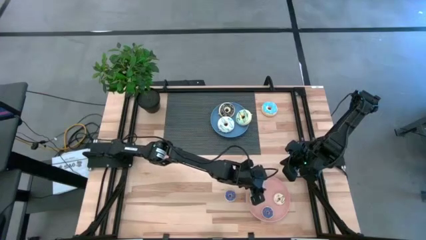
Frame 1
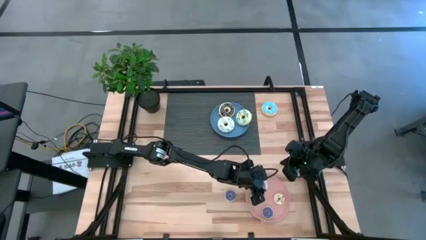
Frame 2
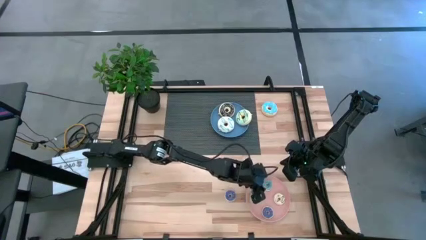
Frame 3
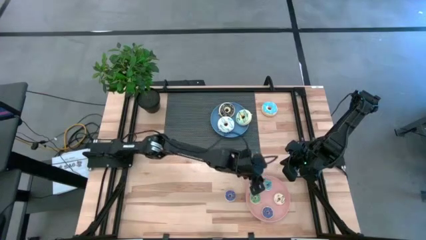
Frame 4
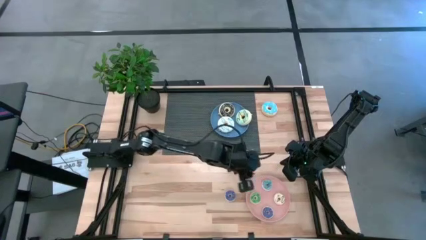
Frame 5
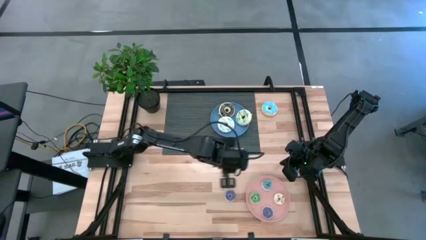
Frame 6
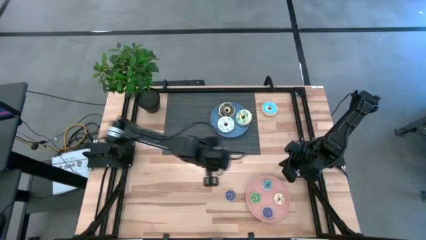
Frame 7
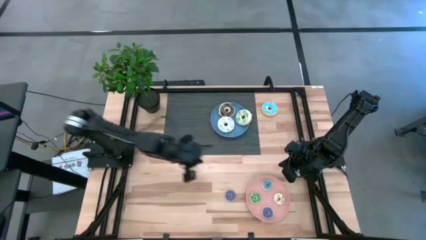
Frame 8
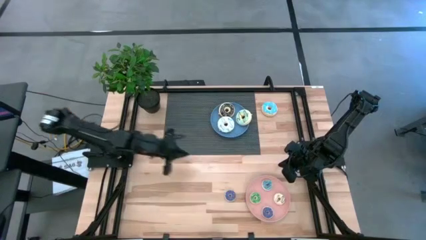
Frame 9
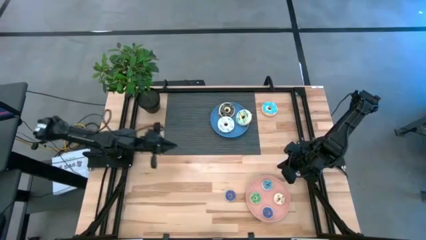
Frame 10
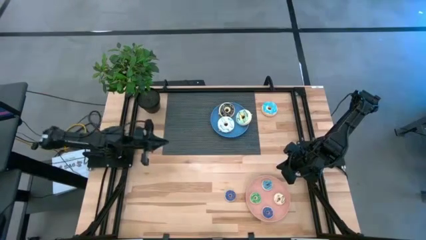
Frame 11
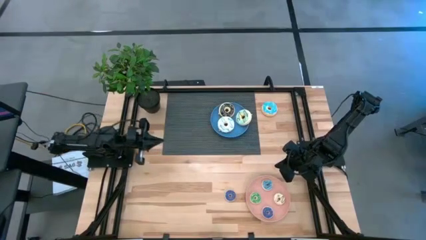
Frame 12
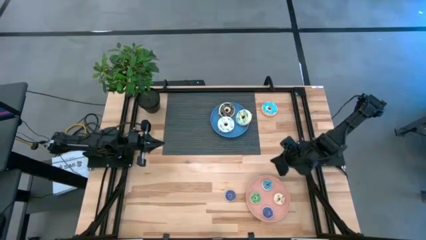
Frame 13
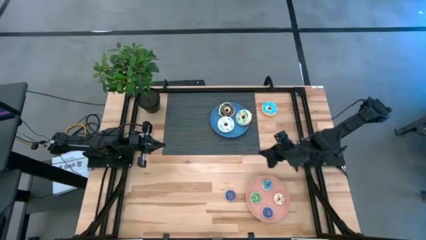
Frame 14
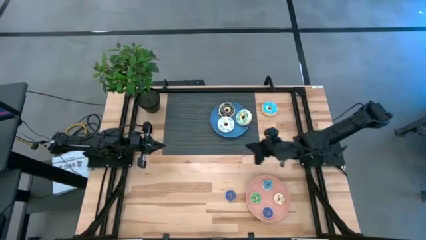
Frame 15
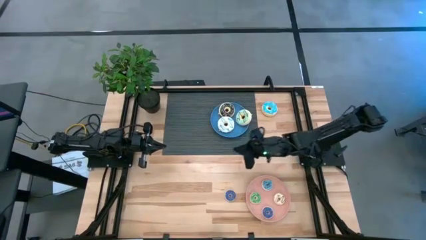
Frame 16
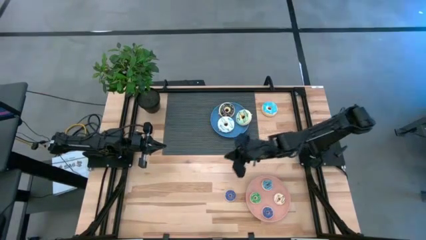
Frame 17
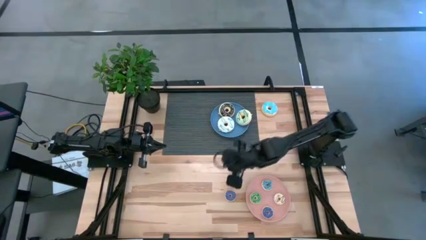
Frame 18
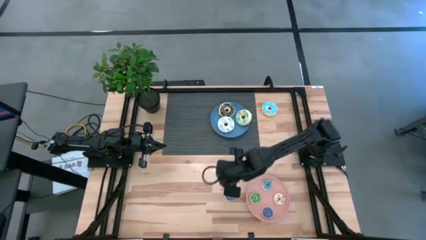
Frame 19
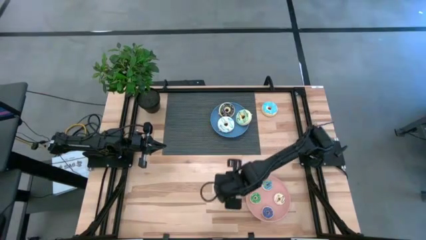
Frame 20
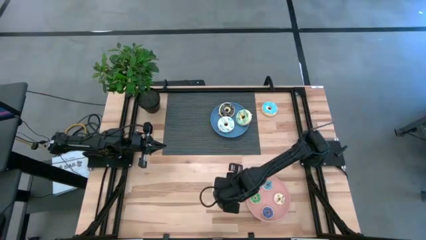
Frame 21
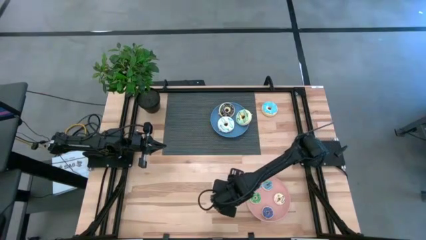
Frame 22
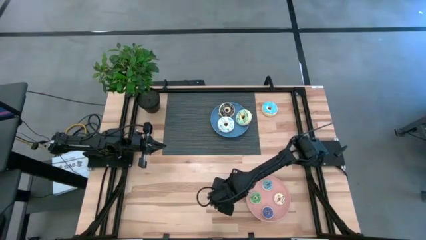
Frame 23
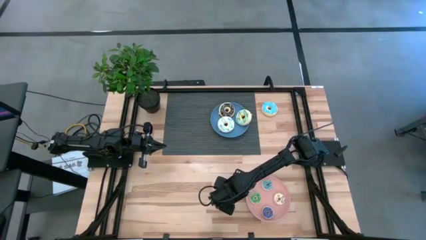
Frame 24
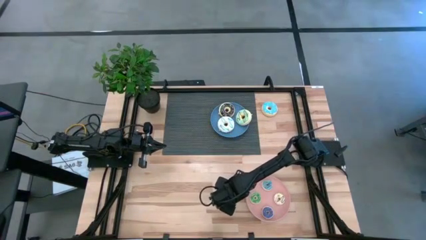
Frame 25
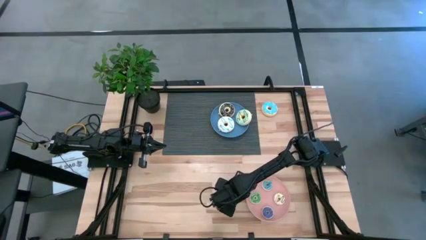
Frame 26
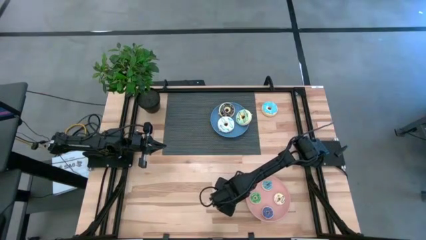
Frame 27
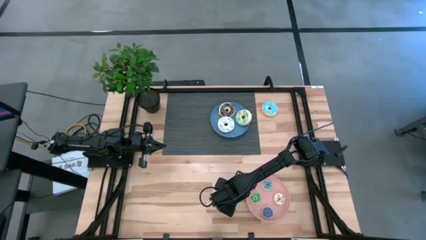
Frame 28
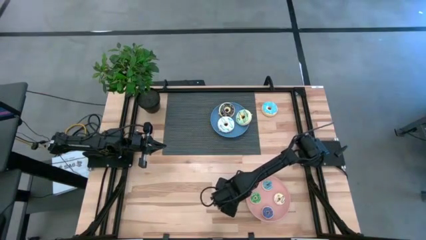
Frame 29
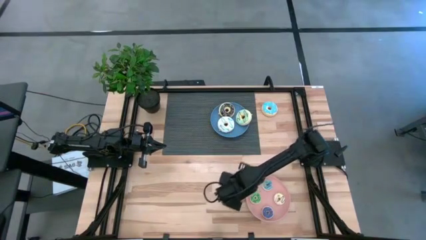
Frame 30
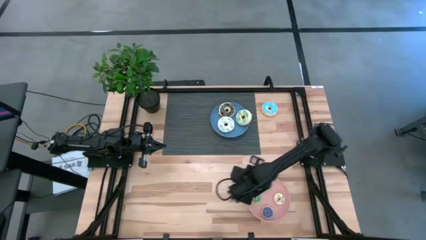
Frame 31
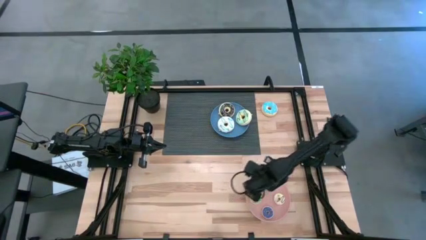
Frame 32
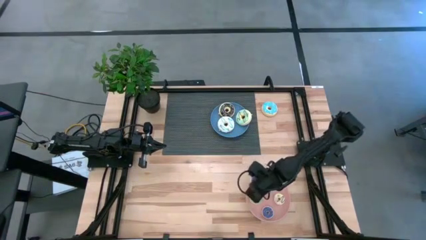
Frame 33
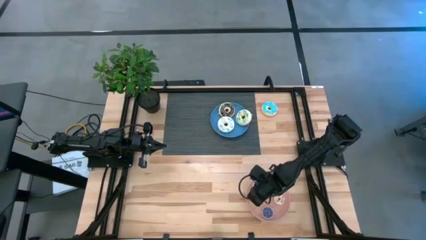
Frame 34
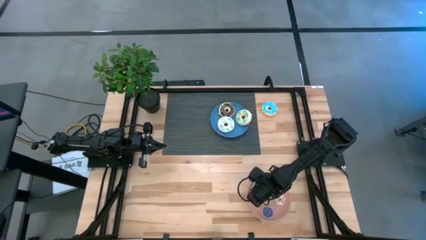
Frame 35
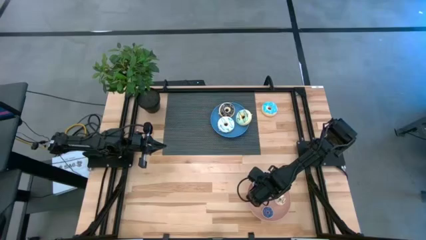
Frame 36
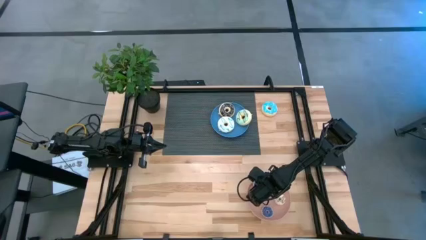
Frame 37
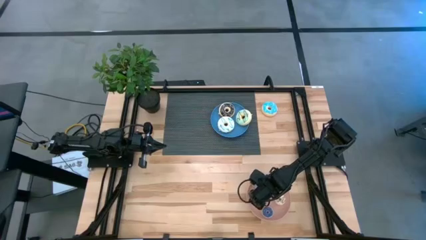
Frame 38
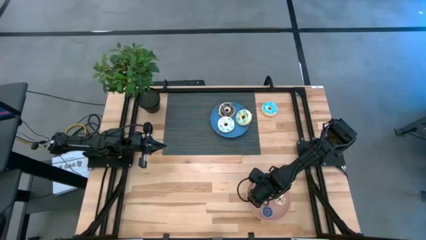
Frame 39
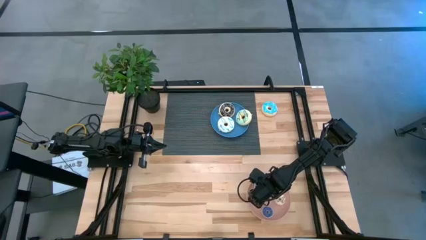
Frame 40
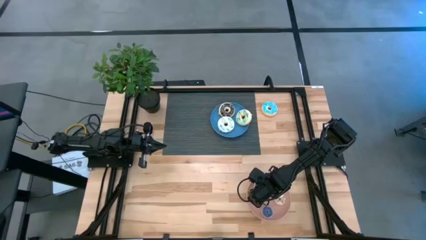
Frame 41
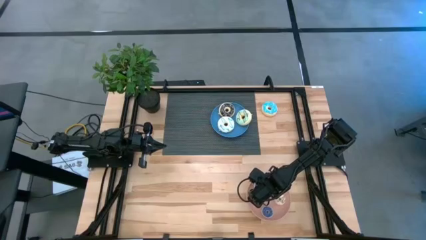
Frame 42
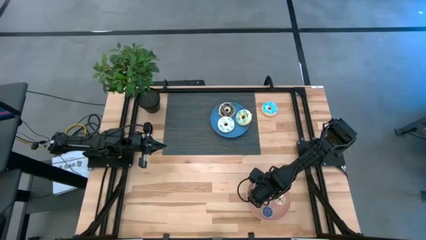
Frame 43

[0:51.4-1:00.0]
Task: Pick & Place donuts
Put the small dark blue donut on the pink plate

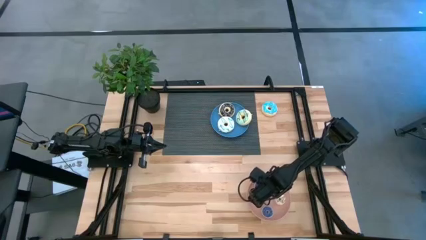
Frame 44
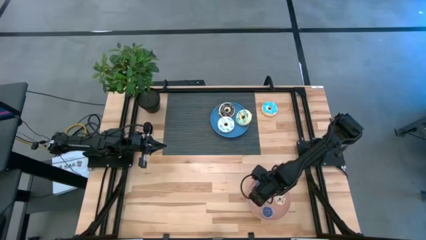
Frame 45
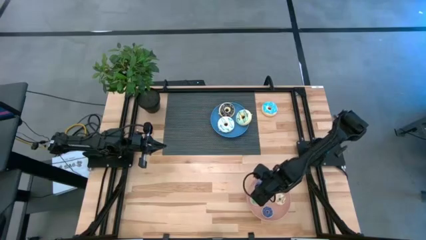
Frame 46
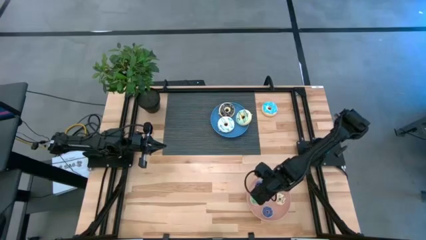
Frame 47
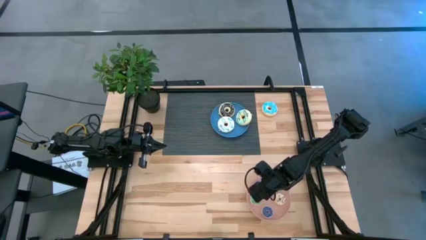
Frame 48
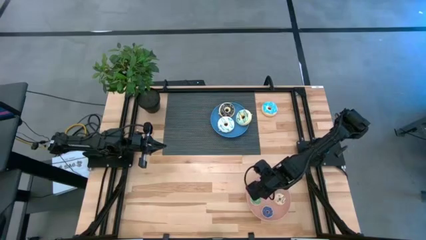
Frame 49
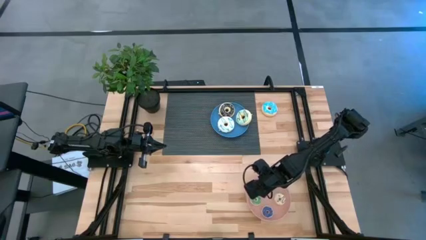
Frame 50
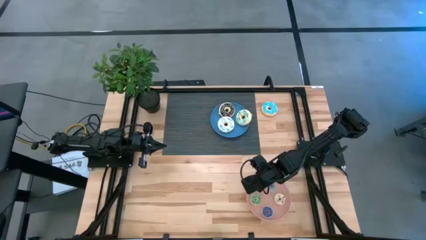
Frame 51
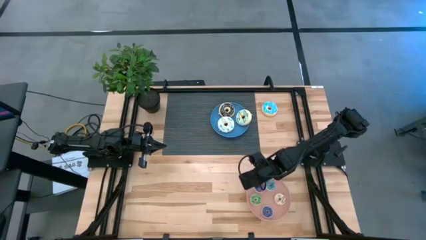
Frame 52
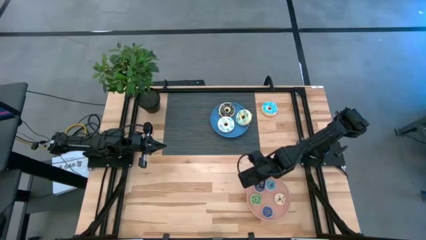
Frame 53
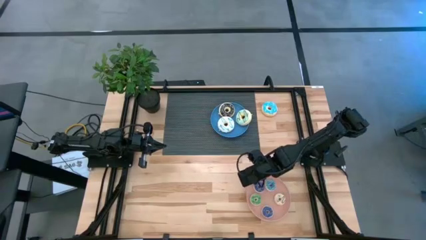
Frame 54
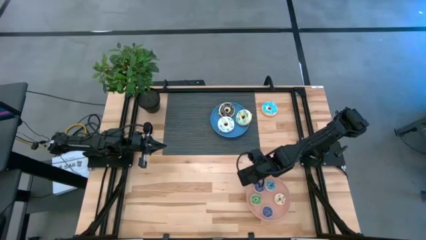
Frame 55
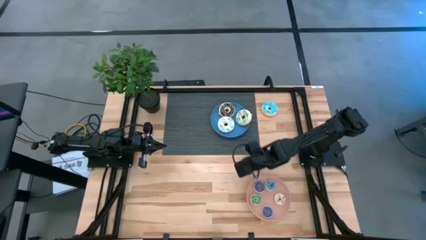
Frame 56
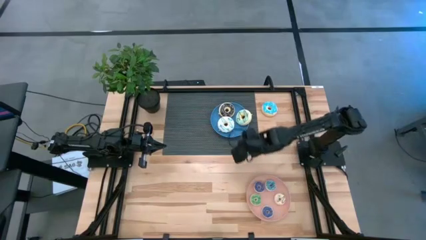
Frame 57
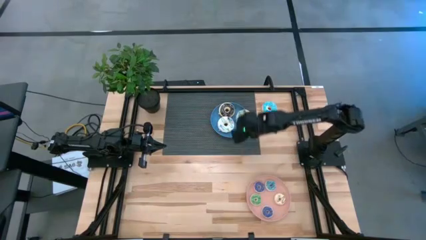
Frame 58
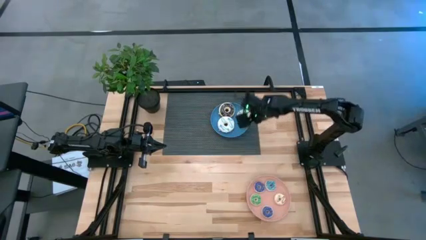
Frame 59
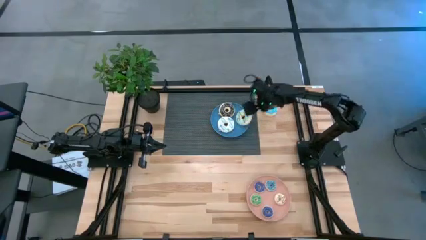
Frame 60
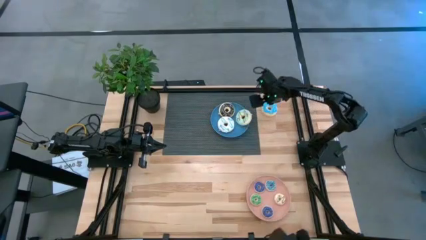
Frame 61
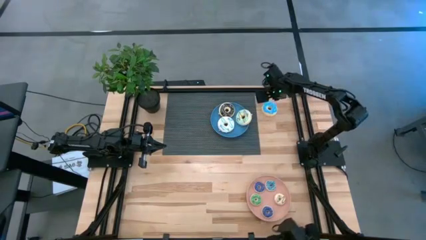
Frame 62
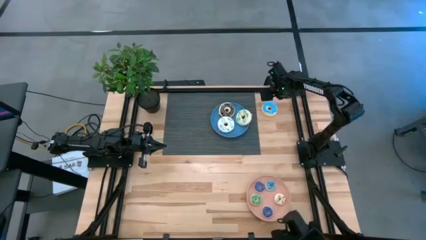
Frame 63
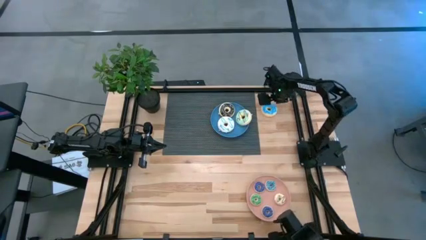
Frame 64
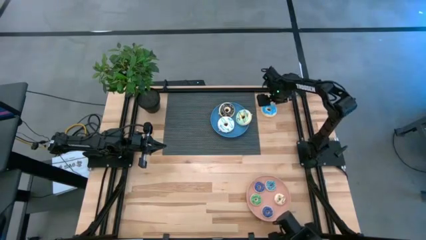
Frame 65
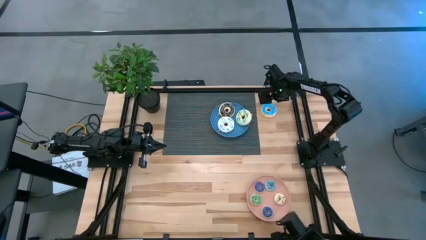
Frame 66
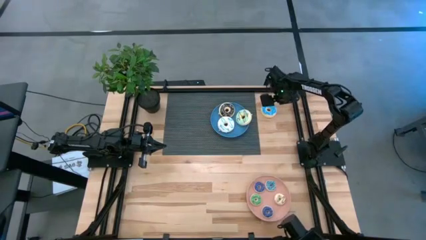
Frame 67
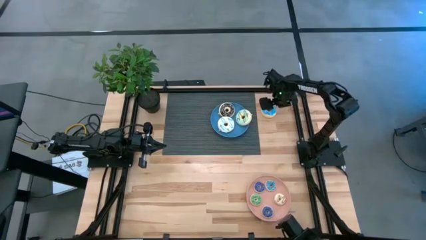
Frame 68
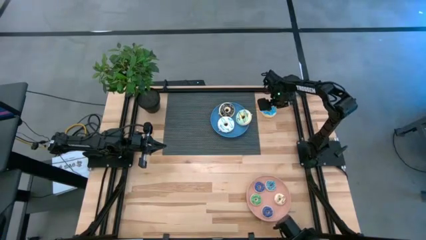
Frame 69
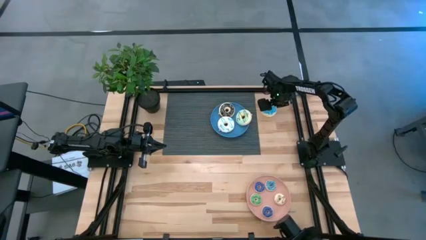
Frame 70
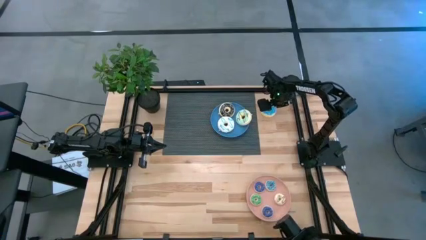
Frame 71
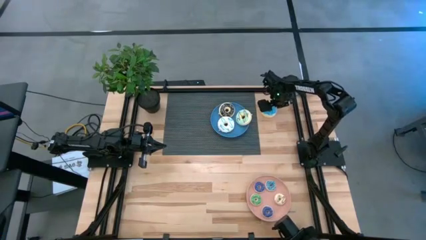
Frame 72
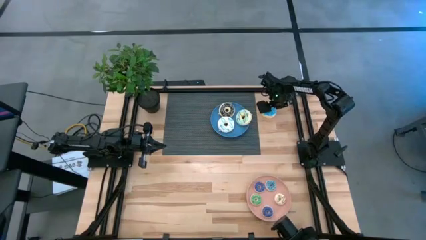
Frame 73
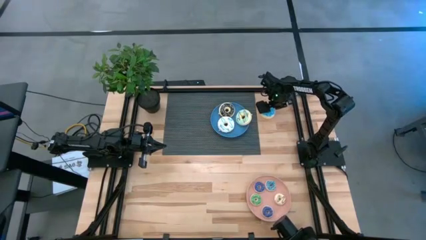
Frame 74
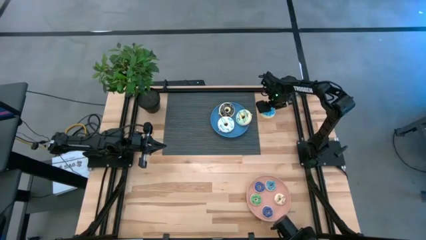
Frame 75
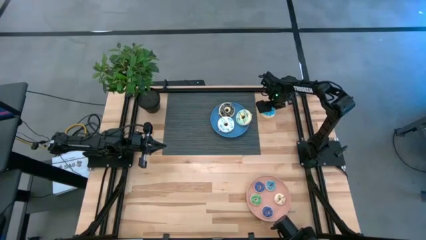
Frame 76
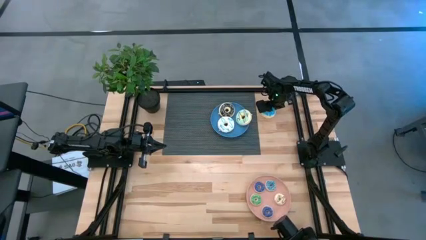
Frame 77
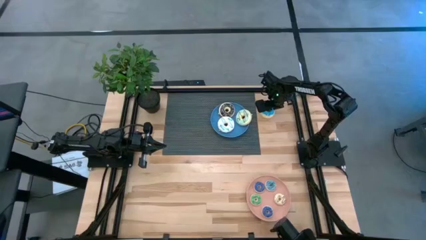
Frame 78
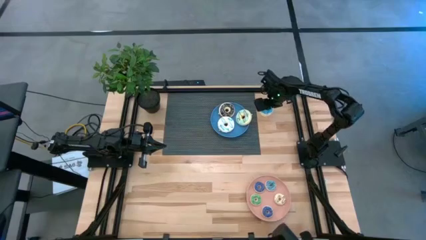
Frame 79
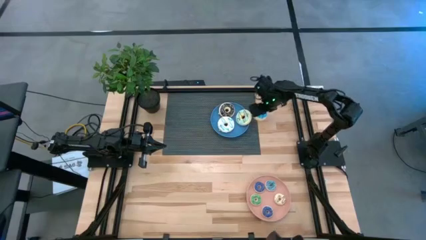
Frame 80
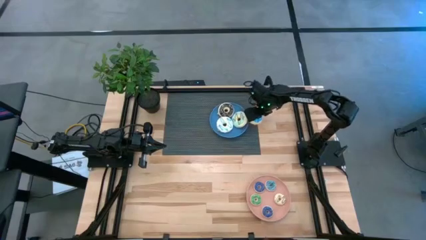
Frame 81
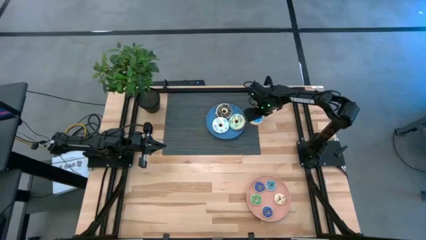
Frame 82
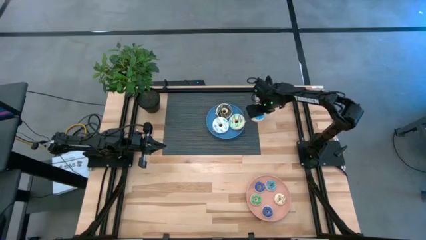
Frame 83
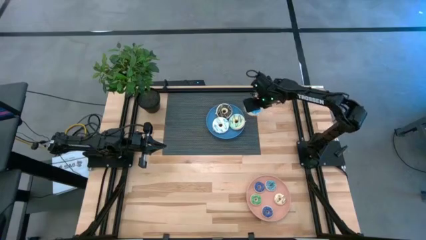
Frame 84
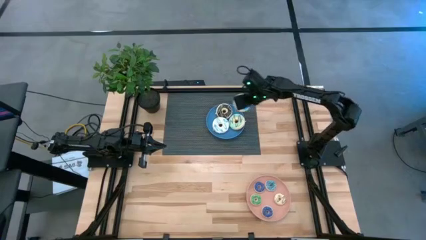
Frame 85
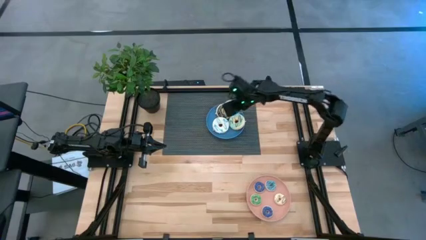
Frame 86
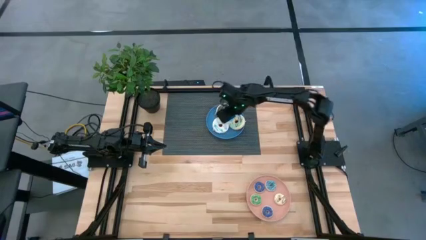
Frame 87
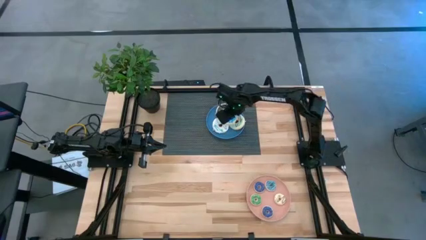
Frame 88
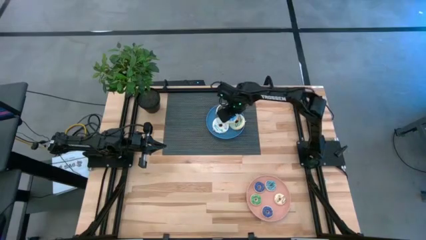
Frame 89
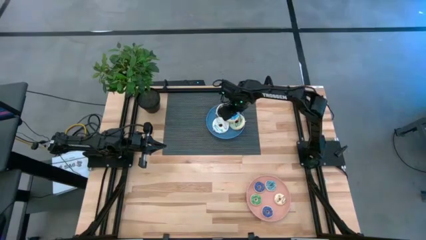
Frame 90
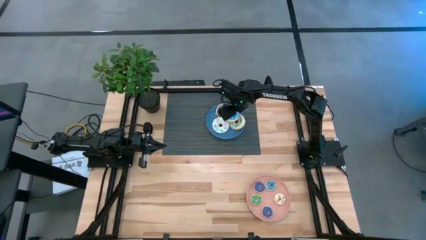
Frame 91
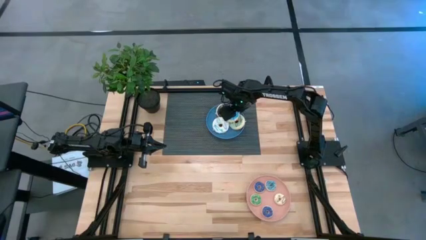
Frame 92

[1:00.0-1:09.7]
Put the large blue donut on the blue plate
